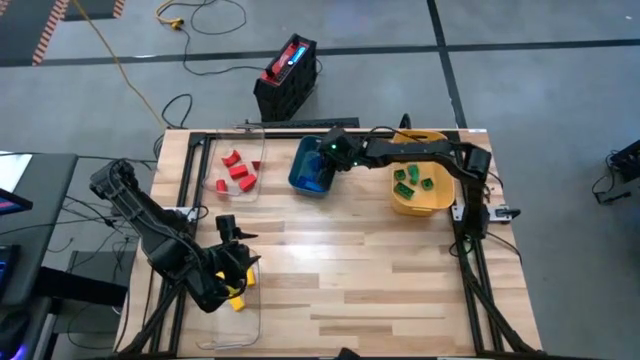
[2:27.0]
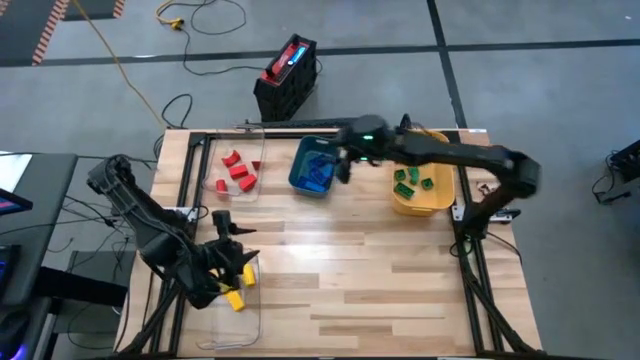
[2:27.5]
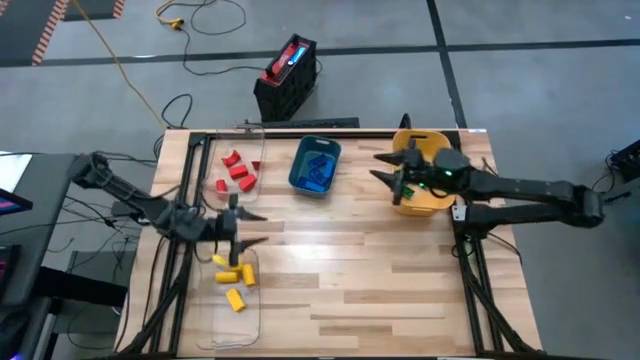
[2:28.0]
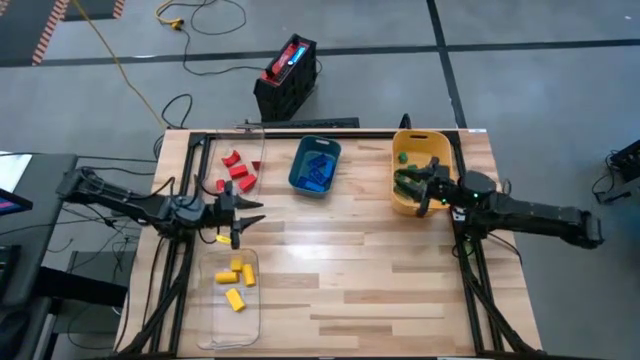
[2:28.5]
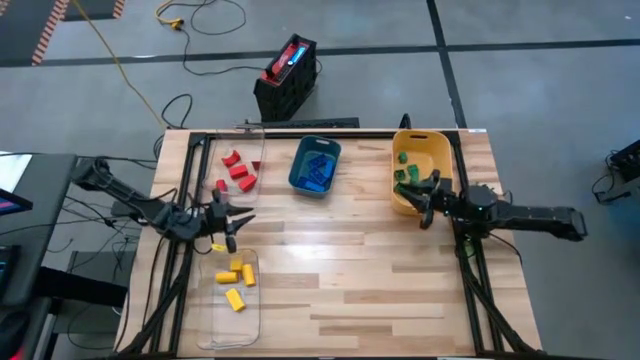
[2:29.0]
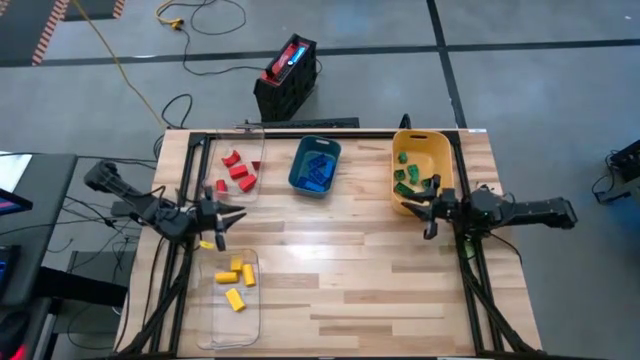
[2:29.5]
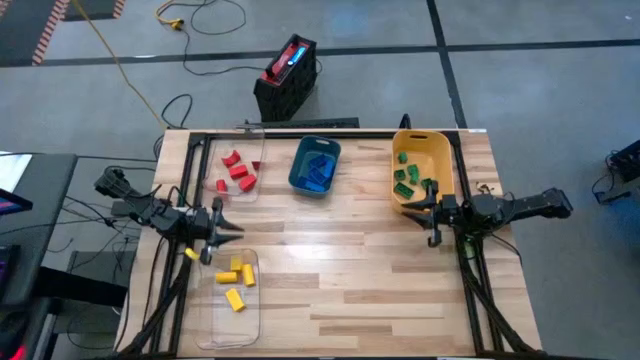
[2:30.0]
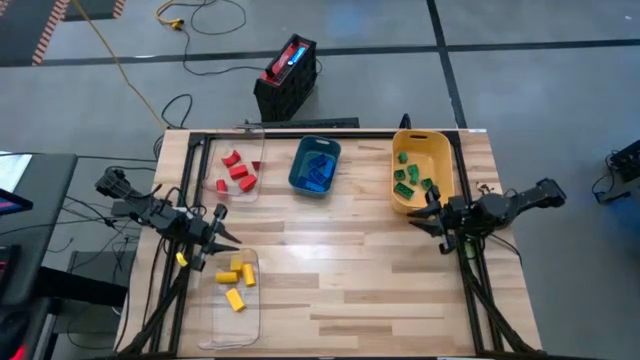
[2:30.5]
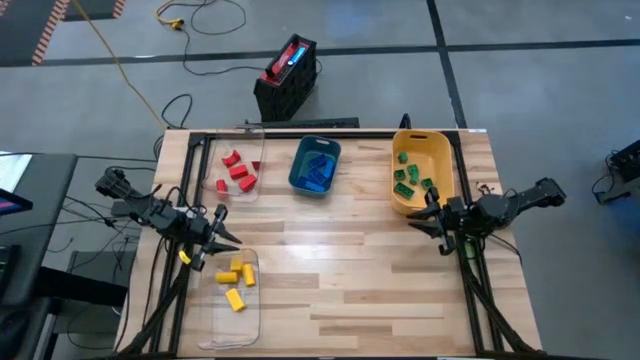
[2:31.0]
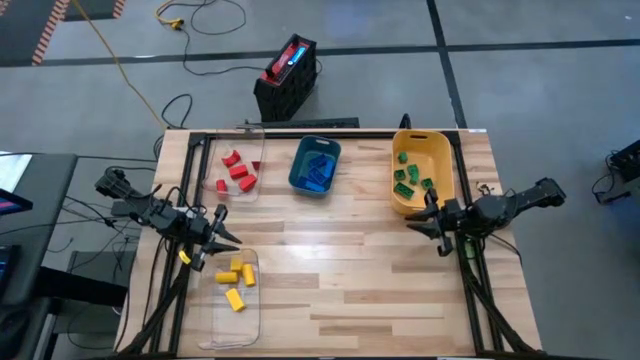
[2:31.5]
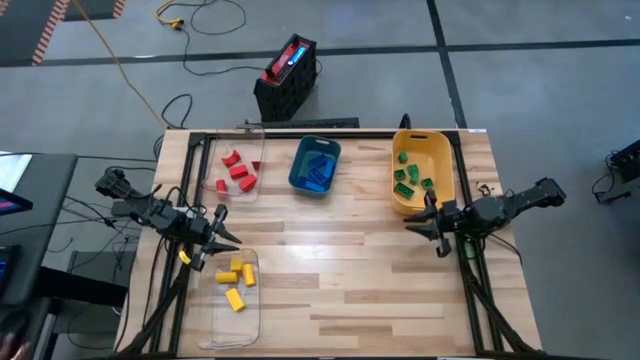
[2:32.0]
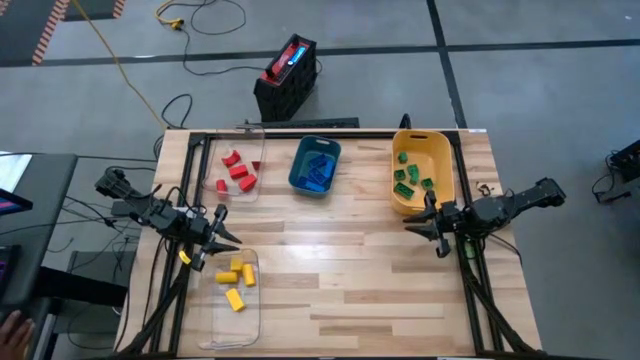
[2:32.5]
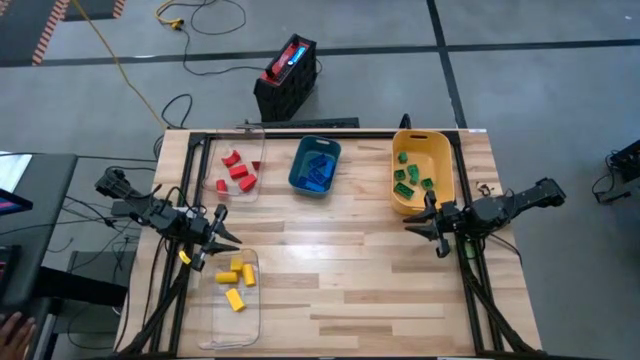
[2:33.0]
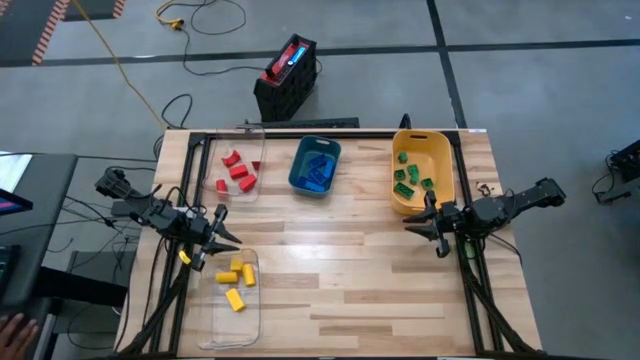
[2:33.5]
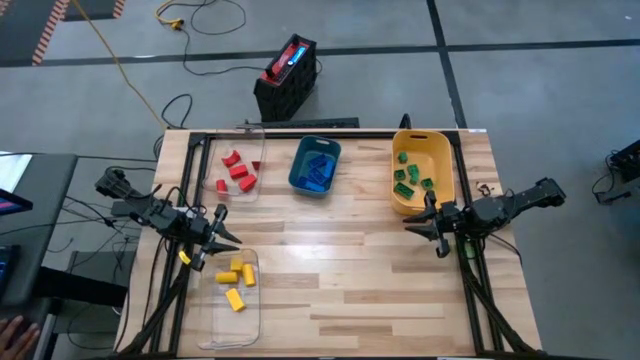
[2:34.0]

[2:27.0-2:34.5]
Task: Sort blocks
Return to Home Position

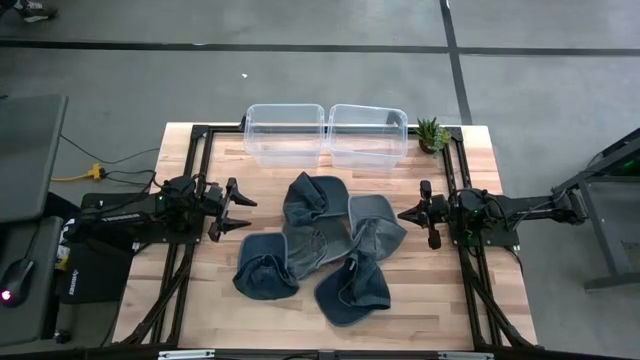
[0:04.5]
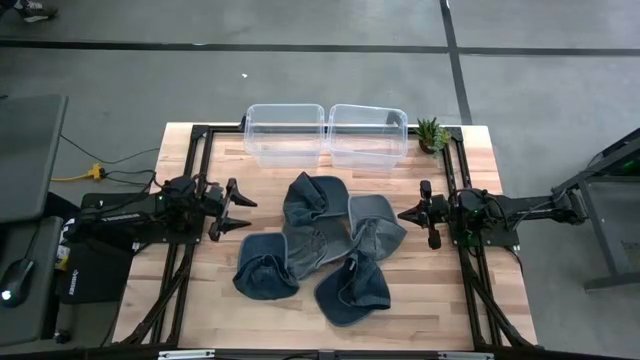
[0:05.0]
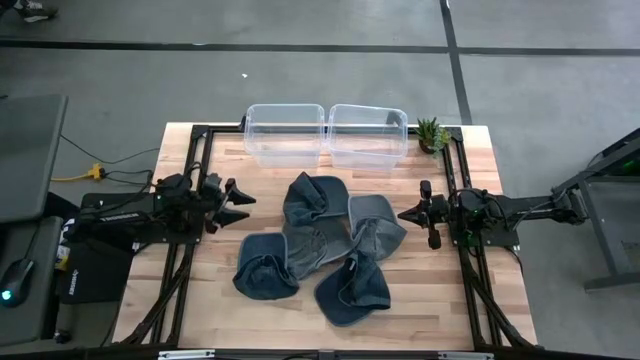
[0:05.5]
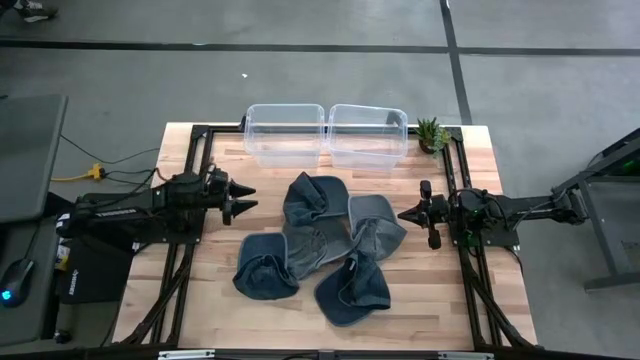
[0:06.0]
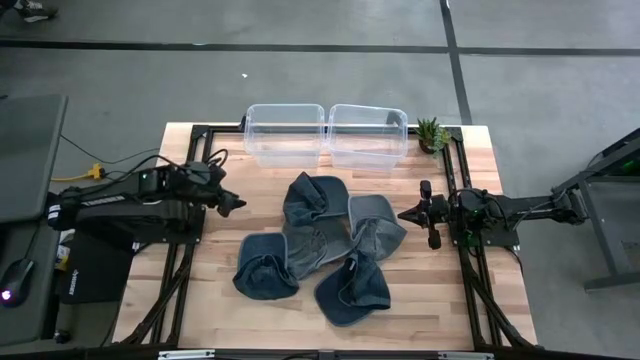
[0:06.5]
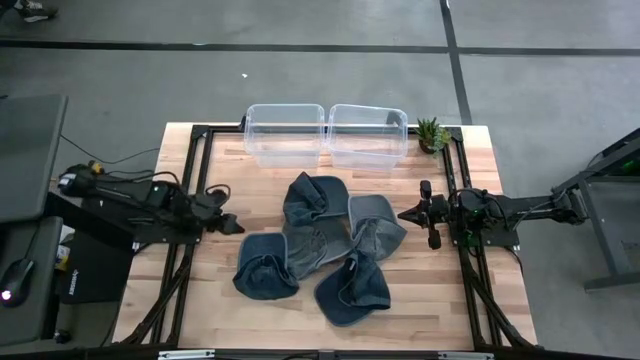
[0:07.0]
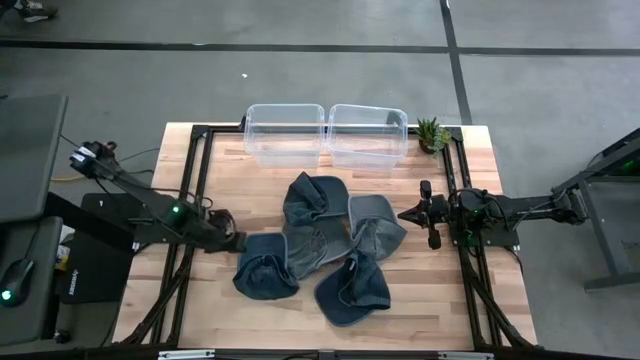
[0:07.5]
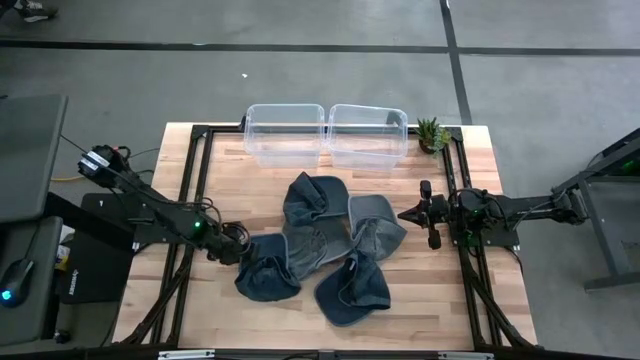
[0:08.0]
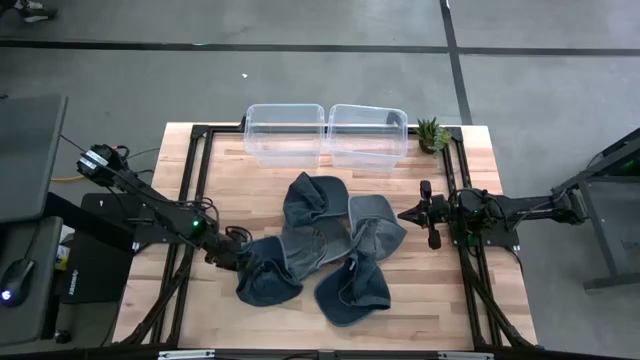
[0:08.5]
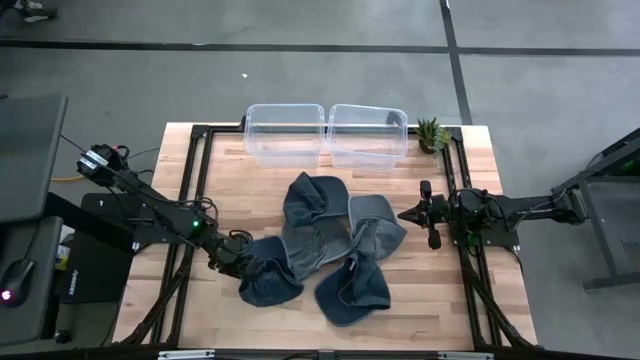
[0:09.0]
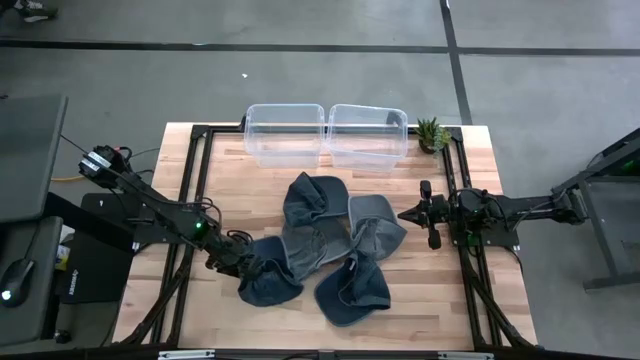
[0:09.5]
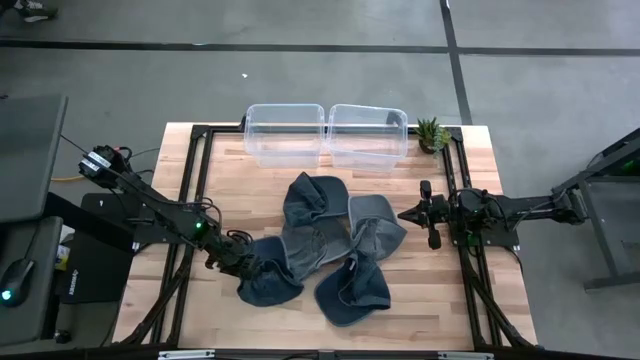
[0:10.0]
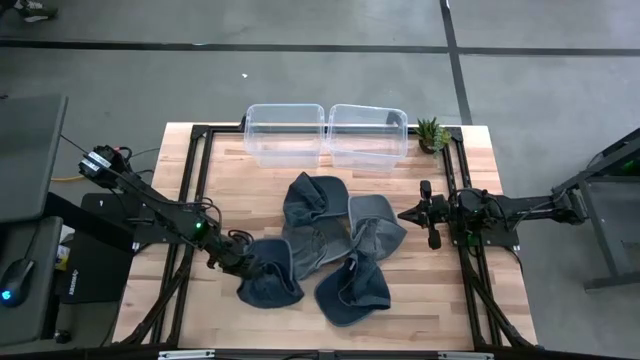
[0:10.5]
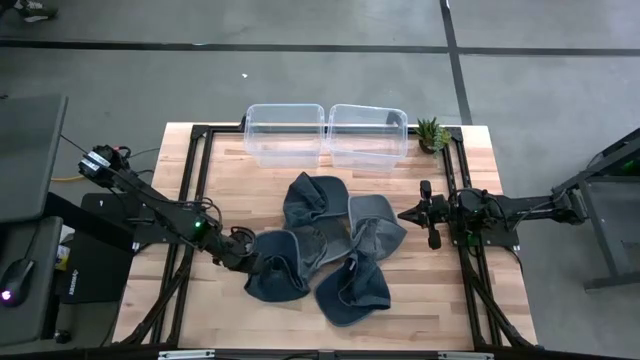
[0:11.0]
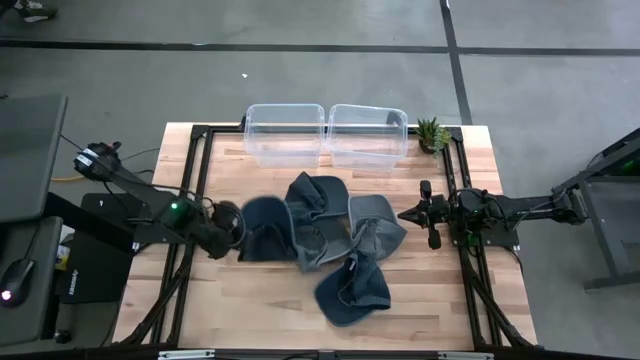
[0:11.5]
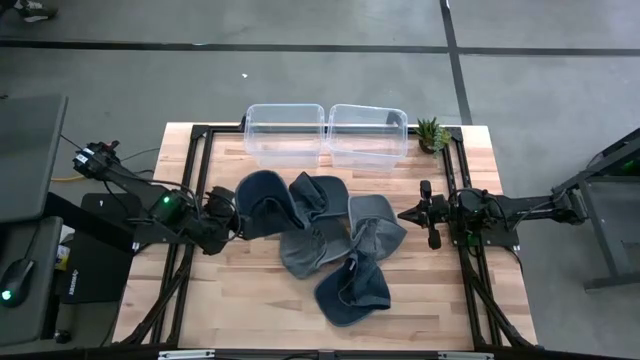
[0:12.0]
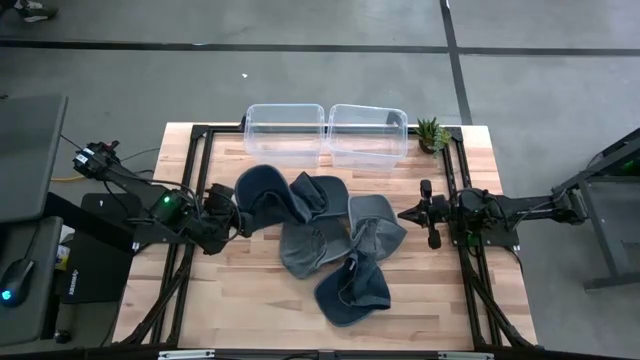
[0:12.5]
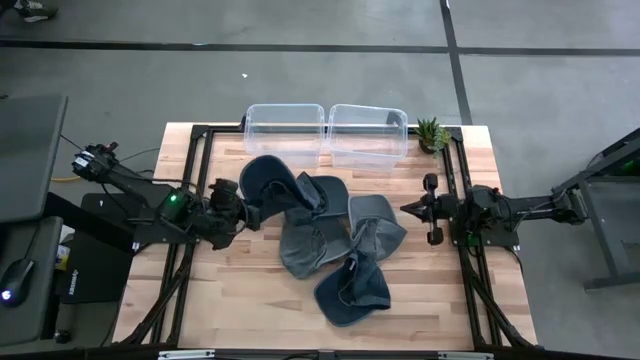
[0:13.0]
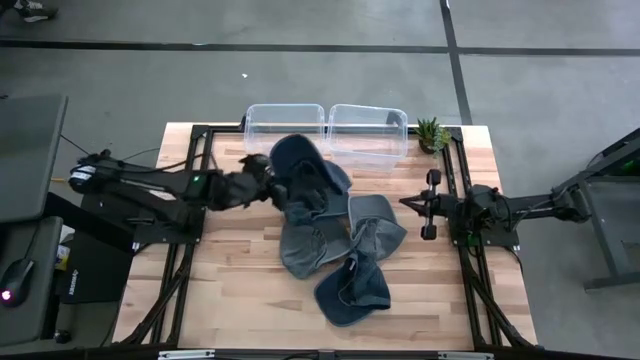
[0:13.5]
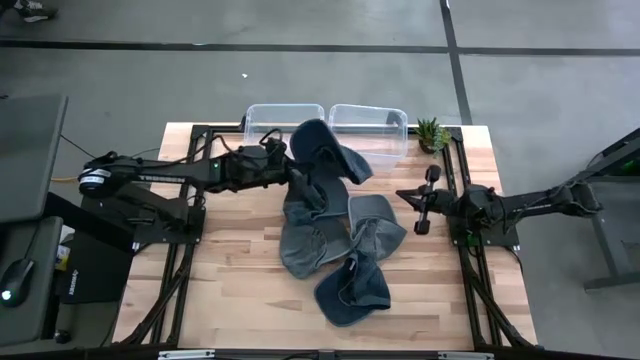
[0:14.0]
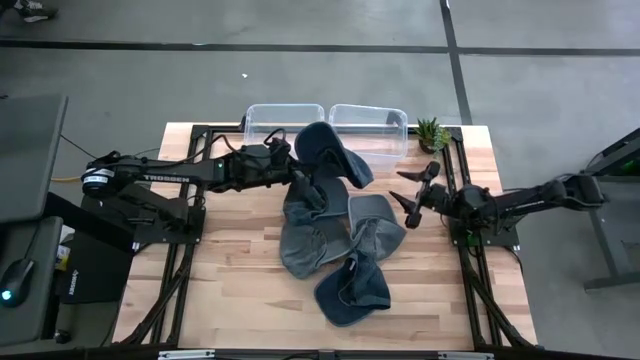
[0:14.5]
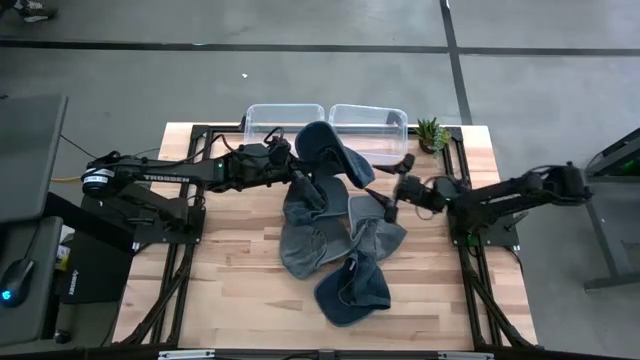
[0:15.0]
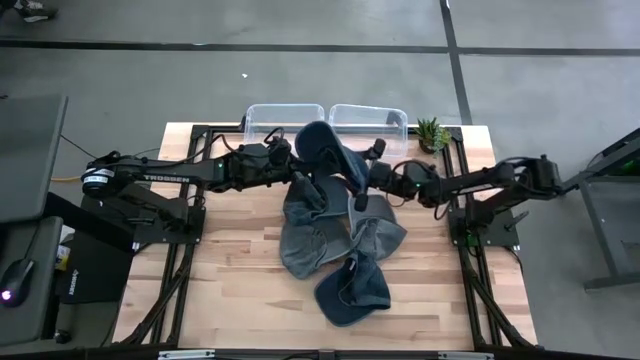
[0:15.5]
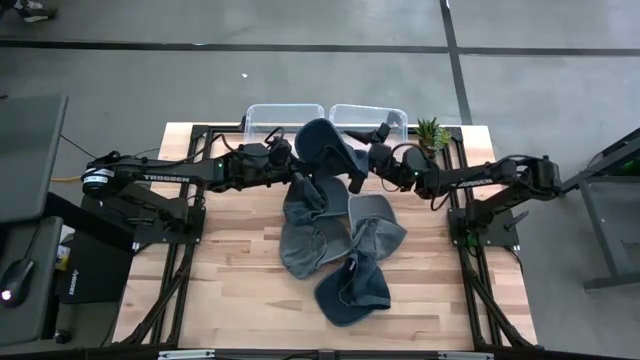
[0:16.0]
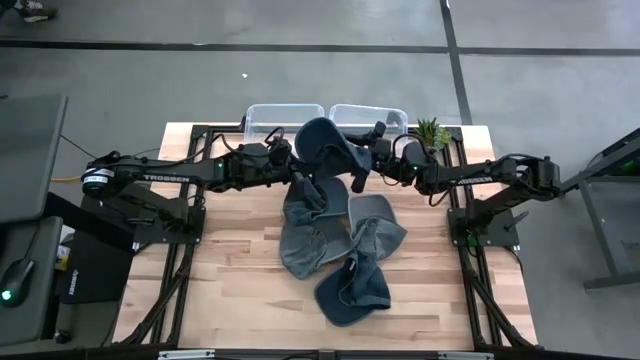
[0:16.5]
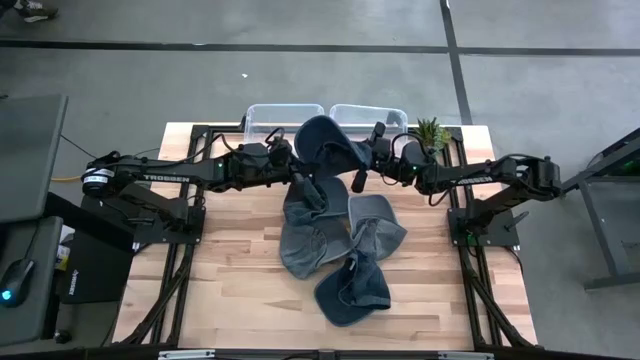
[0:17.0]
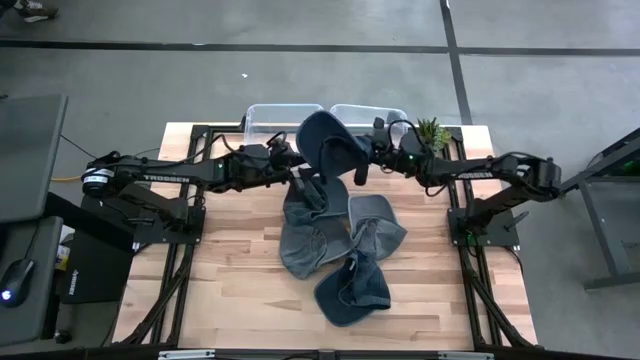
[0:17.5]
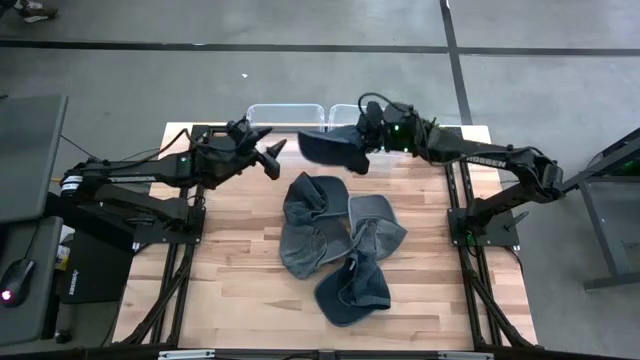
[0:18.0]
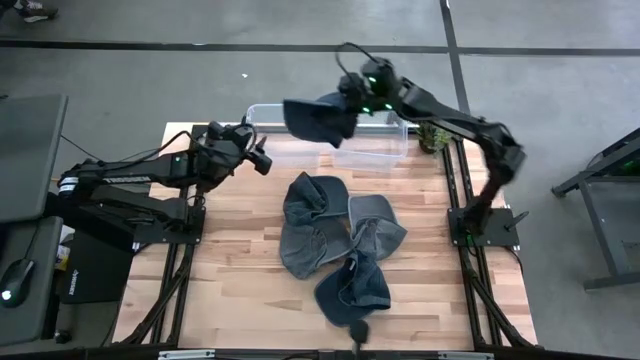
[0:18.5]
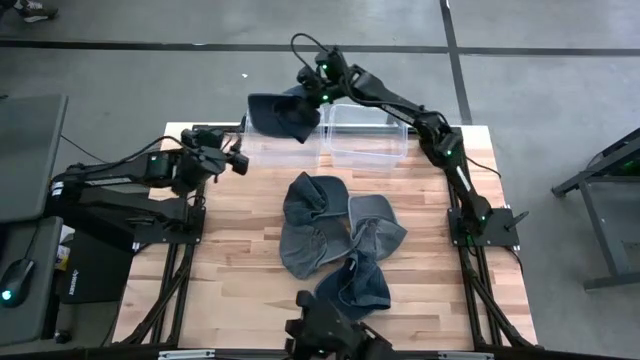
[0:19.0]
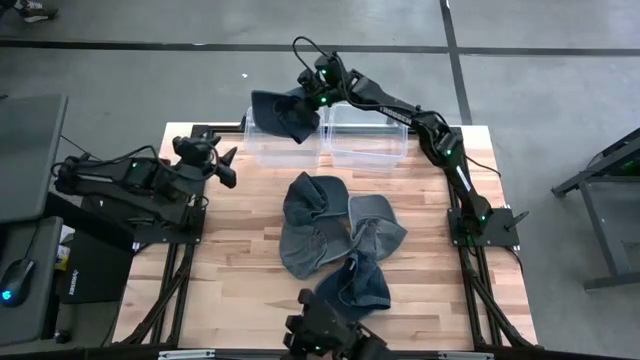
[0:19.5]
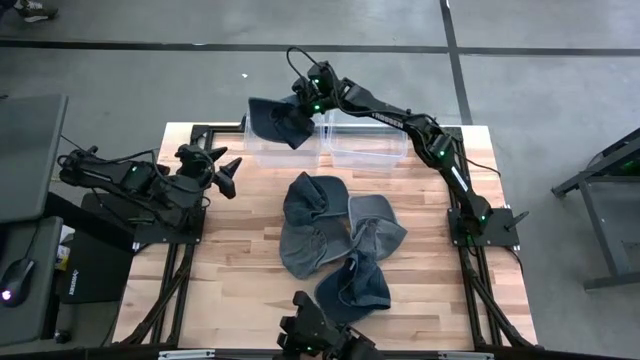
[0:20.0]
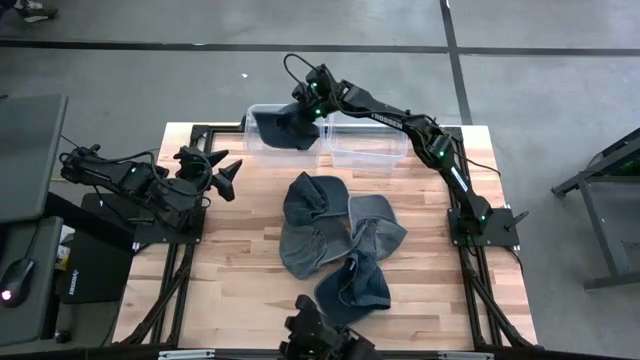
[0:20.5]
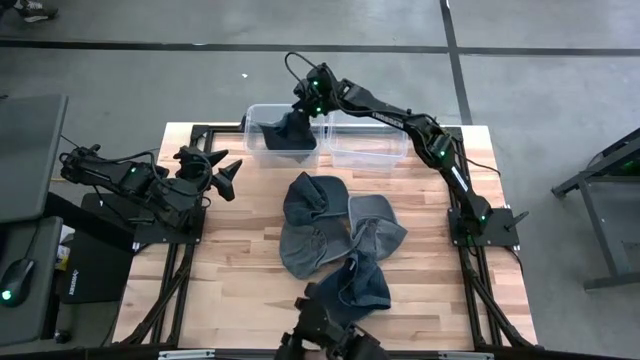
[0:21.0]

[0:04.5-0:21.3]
Task: Pick and place caps into container
Put the bottom left dark blue cap into the left transparent container
